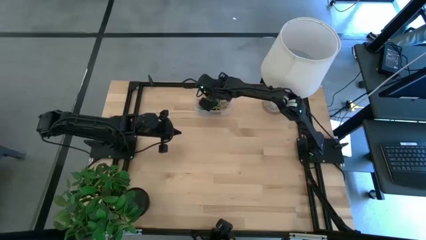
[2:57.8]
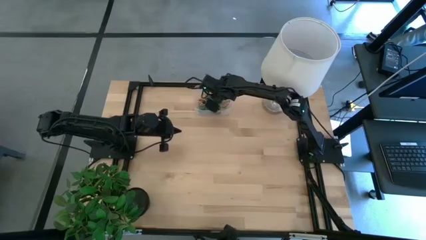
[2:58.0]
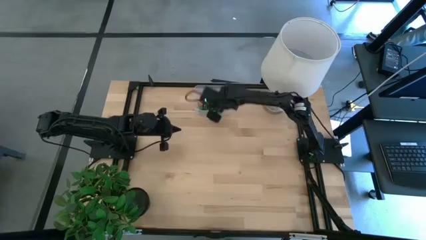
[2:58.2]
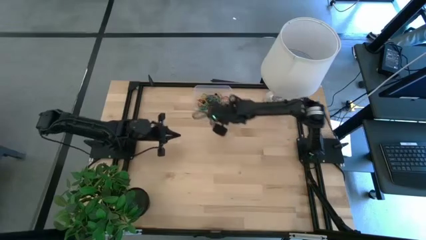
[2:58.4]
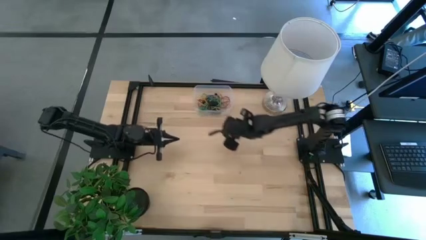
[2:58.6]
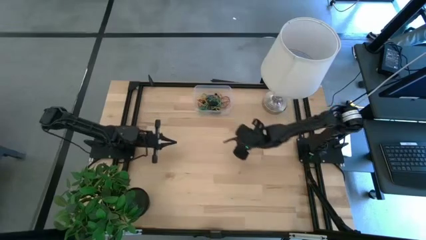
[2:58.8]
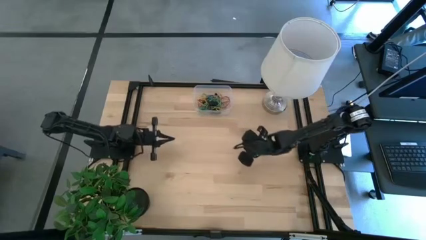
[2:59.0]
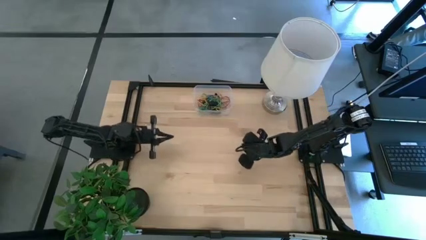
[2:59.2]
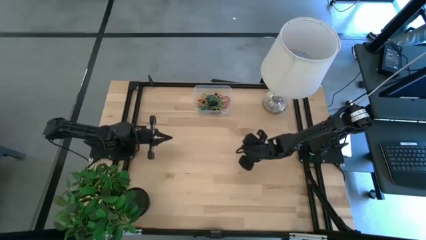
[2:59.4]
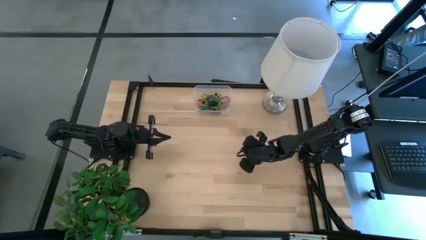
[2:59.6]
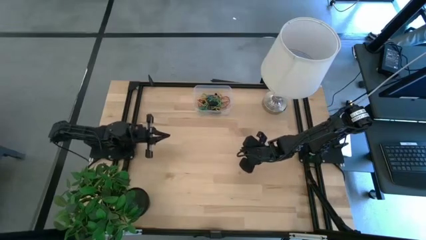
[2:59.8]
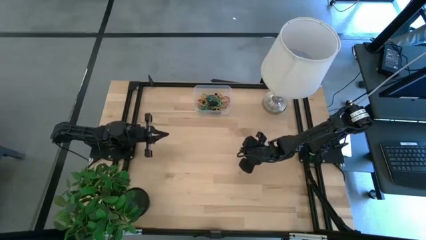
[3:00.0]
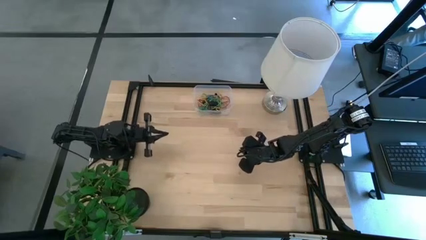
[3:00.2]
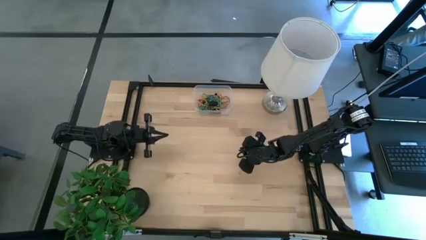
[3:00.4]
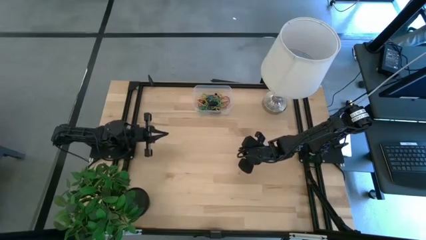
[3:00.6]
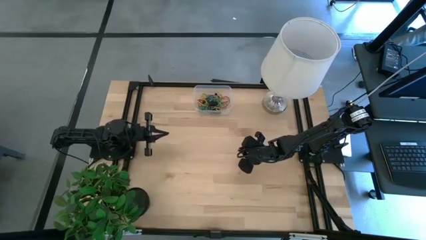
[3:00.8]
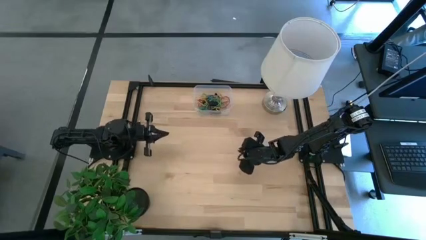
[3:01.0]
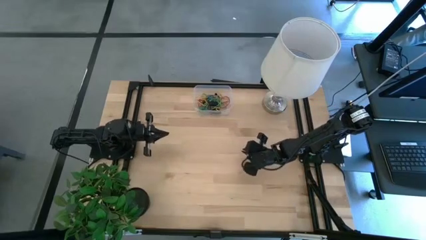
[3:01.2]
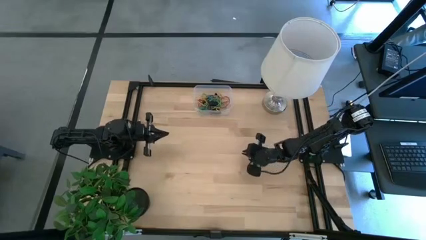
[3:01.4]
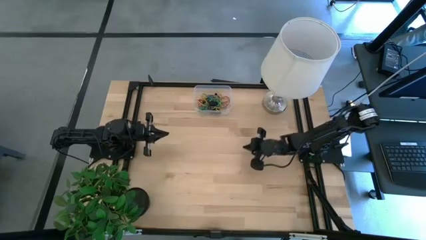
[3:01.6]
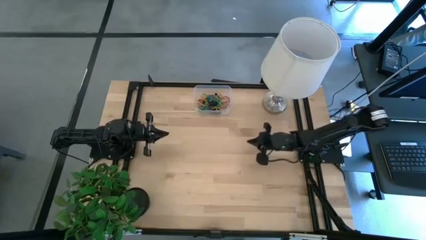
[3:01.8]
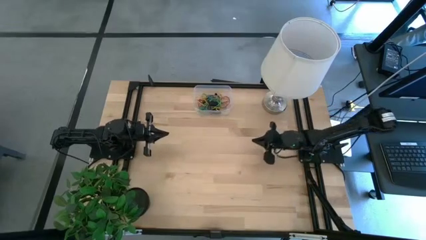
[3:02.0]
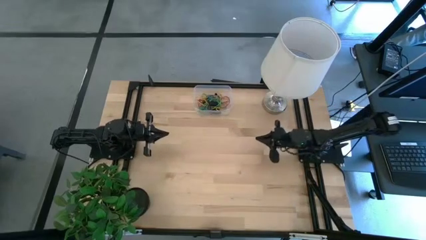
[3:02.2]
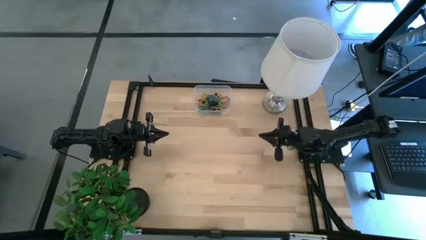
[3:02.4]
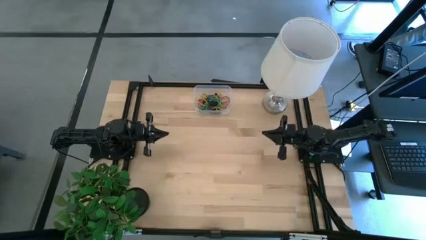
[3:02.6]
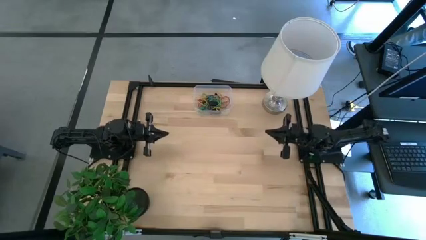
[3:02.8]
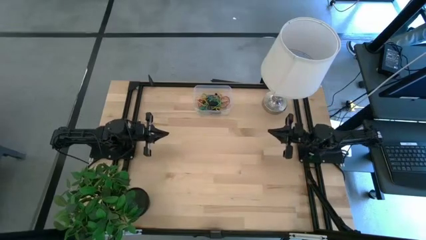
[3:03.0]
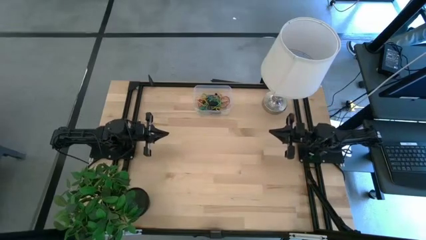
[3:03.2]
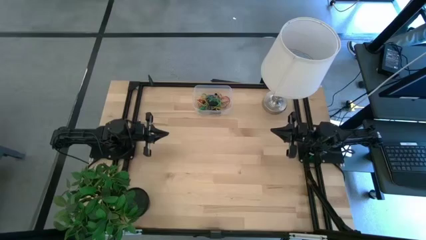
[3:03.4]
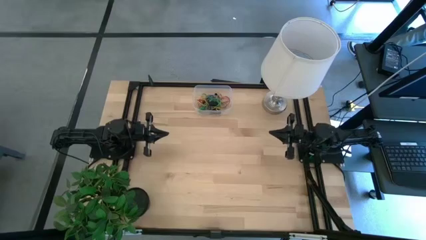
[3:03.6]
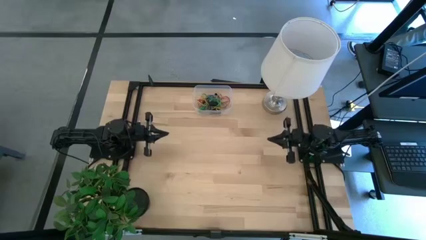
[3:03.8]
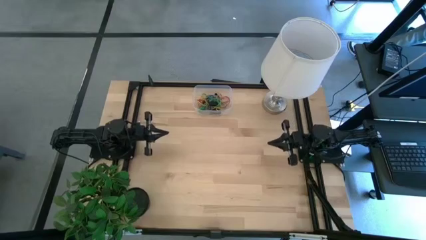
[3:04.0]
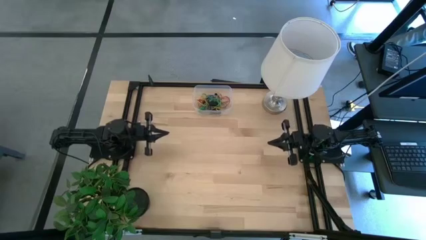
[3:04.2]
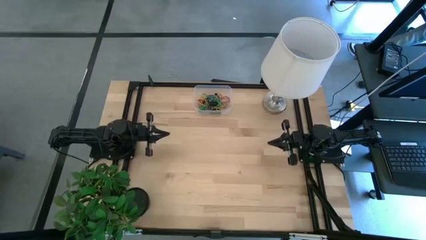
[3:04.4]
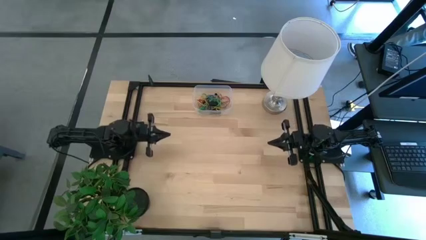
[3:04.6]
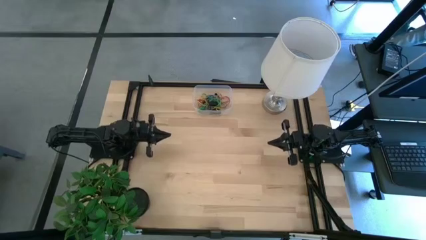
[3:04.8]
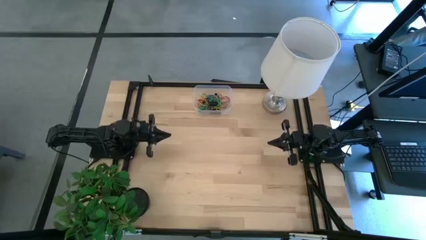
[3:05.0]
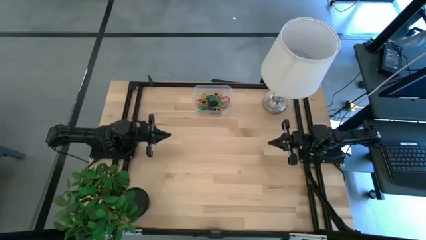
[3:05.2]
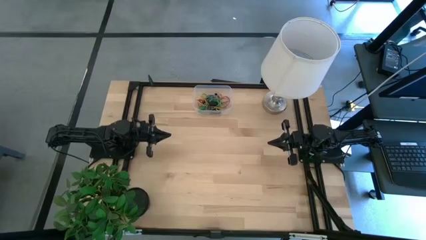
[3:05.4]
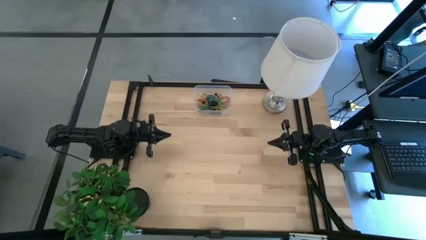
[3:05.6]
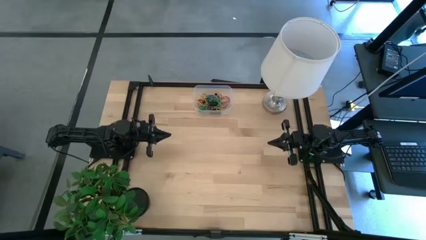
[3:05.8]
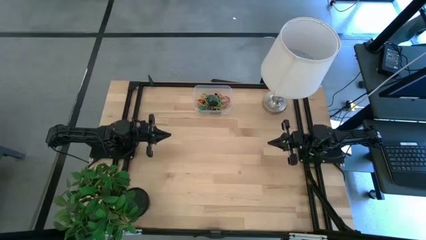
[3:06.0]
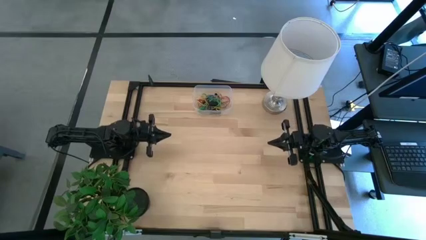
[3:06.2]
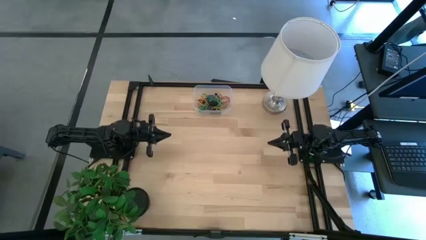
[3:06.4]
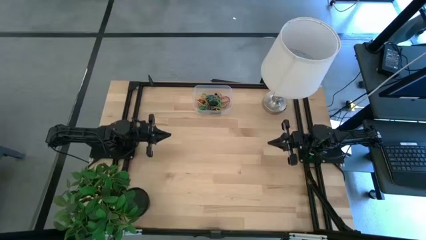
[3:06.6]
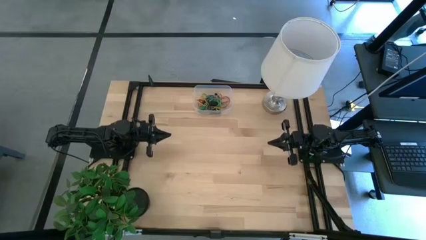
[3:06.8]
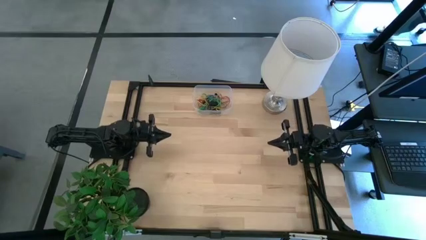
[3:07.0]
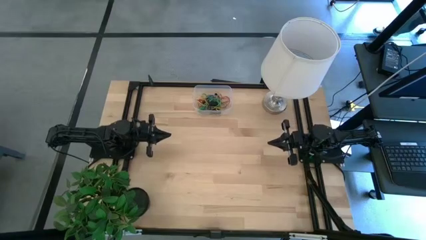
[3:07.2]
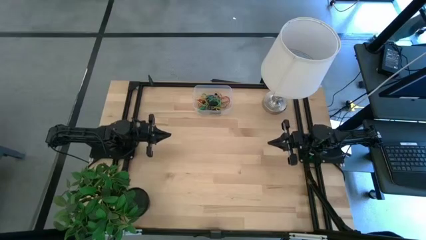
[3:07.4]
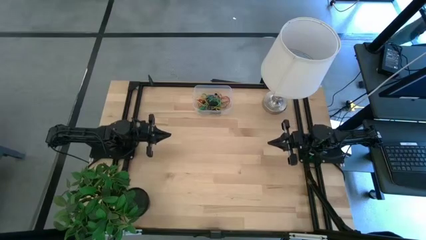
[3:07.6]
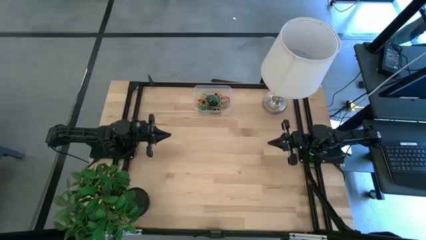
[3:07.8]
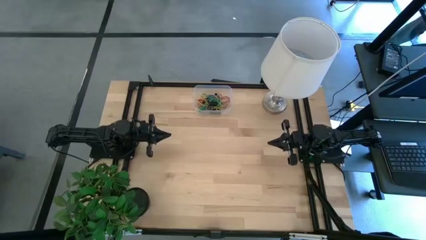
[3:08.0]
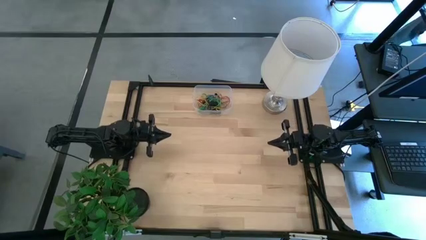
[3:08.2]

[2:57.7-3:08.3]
Task: Pick and place rubber bands into bin
Return to Home Position

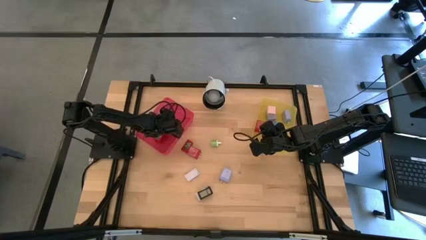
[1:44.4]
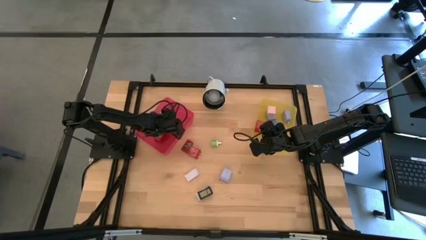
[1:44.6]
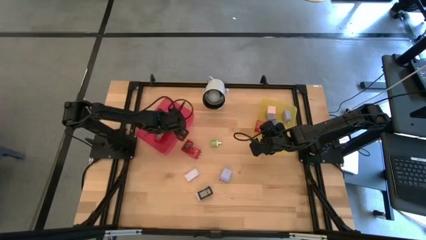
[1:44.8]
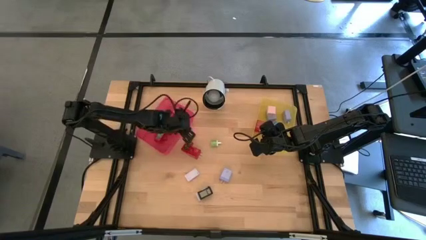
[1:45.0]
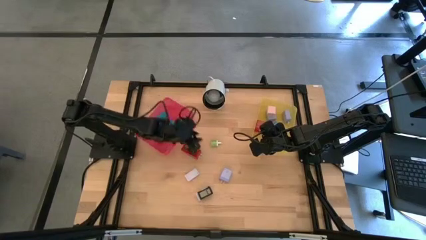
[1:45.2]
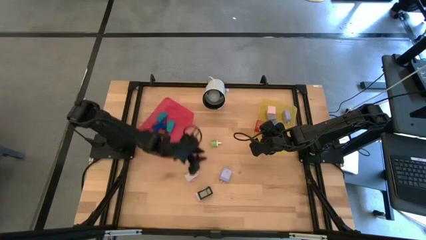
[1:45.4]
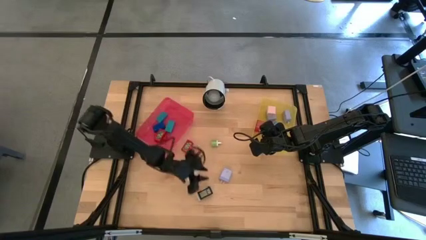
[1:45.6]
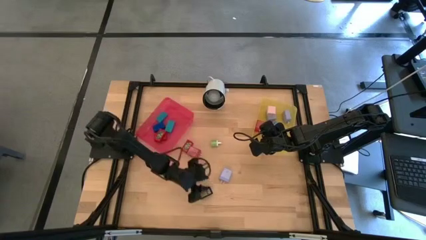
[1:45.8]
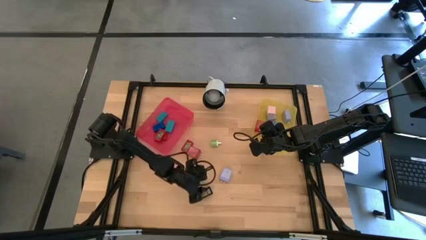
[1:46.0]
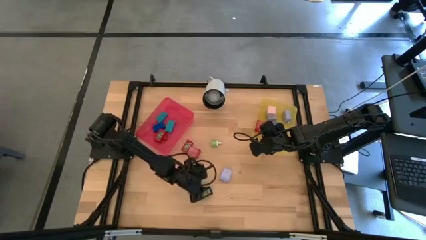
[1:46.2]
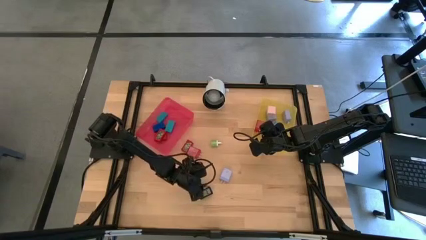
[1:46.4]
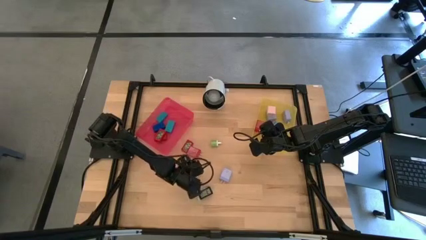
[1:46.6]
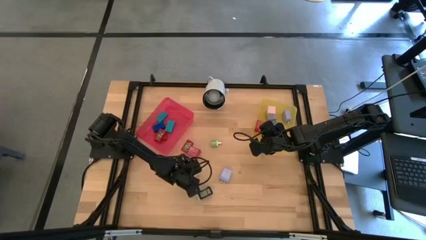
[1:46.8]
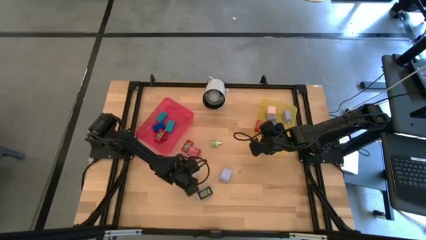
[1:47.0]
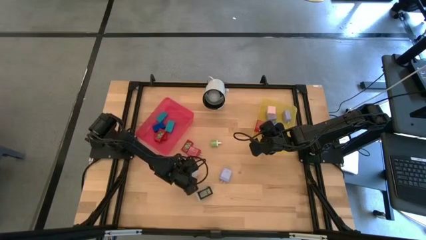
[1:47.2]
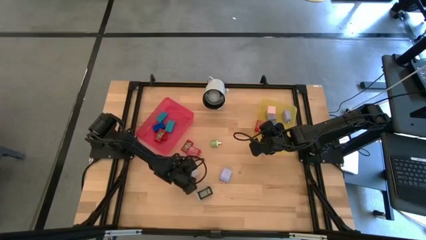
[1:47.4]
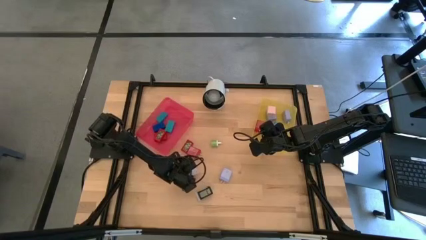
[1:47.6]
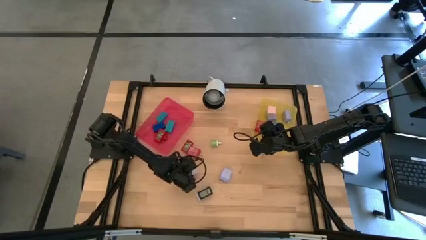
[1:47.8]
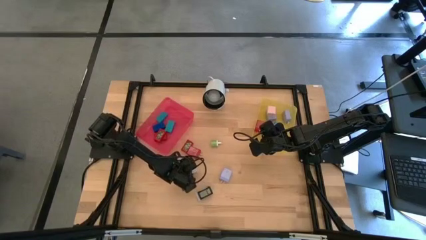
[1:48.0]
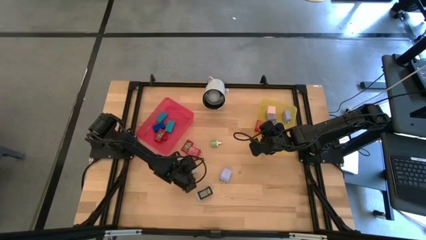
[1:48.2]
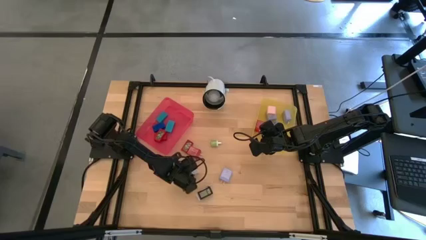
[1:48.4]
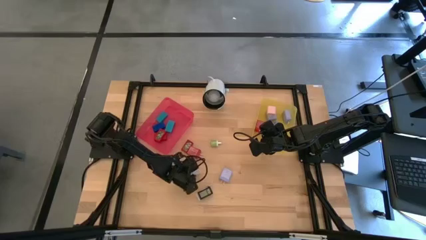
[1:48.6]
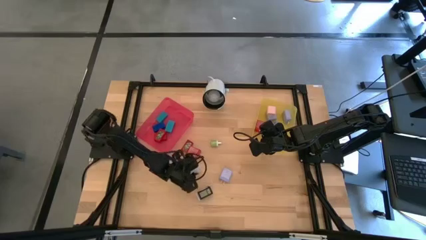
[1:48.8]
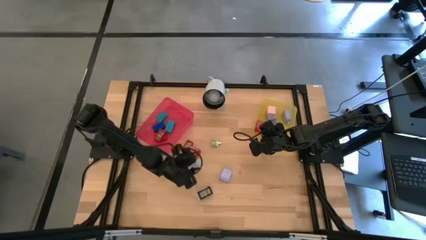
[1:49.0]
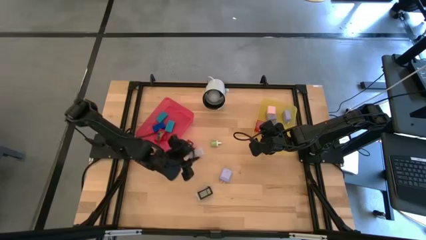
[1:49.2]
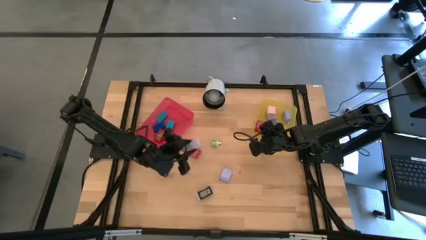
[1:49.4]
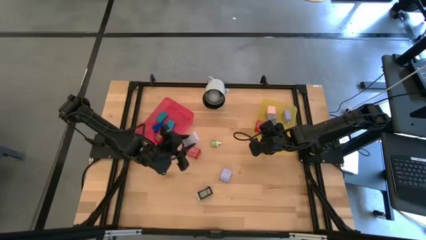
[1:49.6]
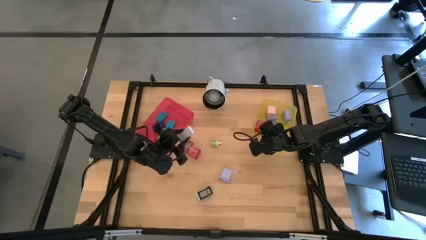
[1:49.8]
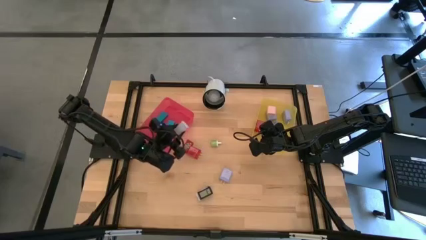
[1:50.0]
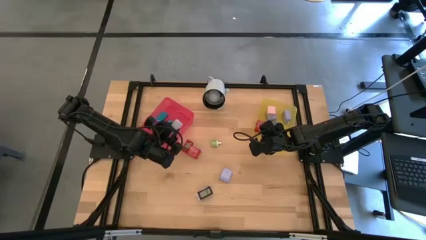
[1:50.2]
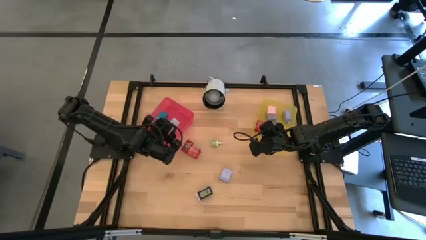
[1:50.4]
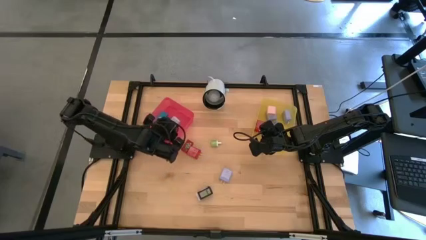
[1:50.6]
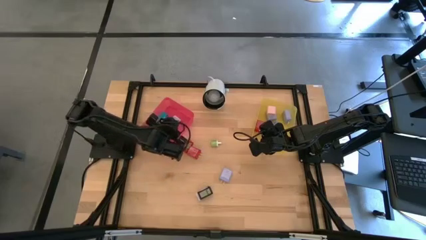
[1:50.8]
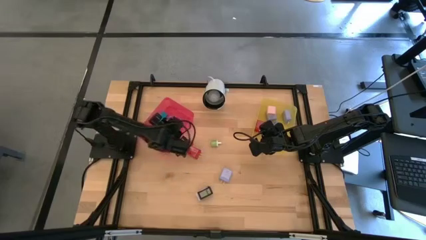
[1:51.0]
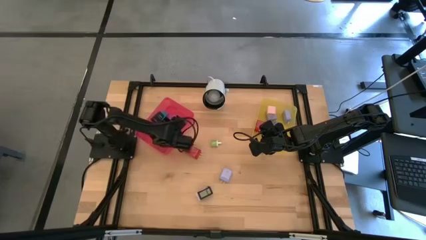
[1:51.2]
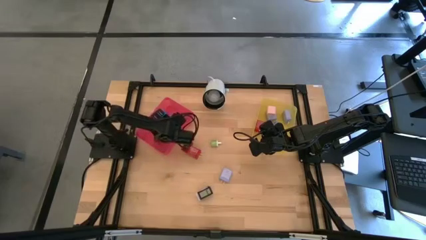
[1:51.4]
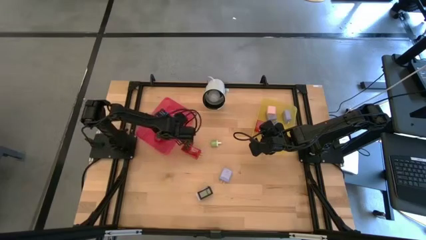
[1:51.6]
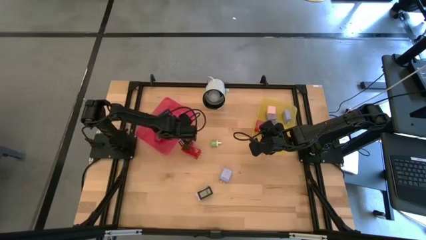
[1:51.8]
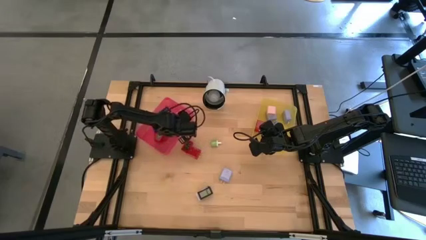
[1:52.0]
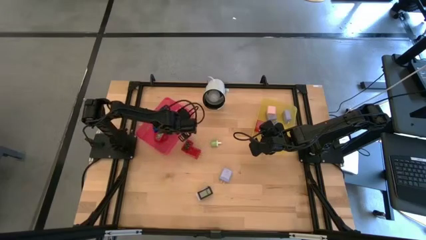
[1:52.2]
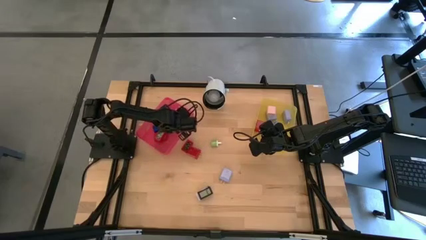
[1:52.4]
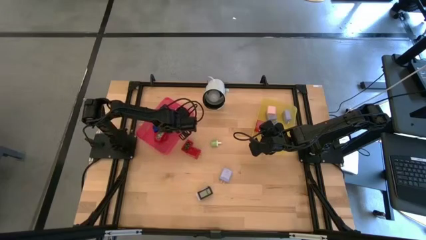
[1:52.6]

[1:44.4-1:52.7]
Task: Pick & Place Office items
Put the white digital timer into the pink bin
